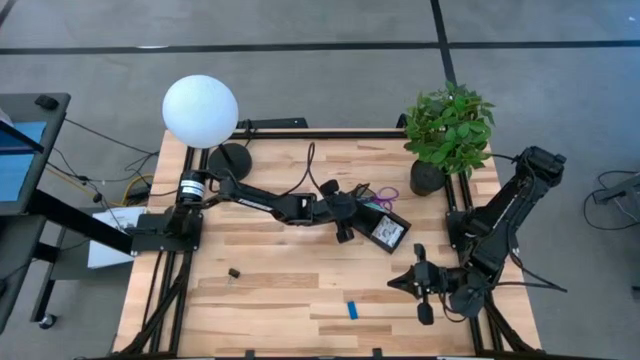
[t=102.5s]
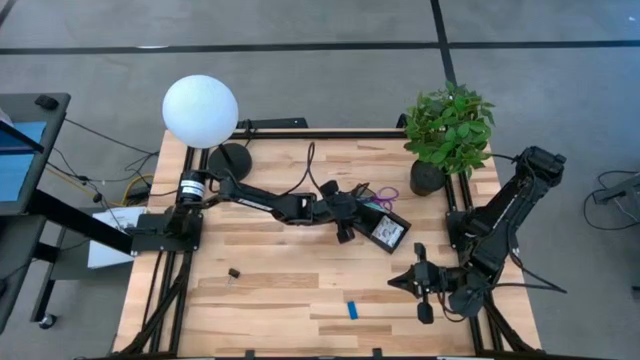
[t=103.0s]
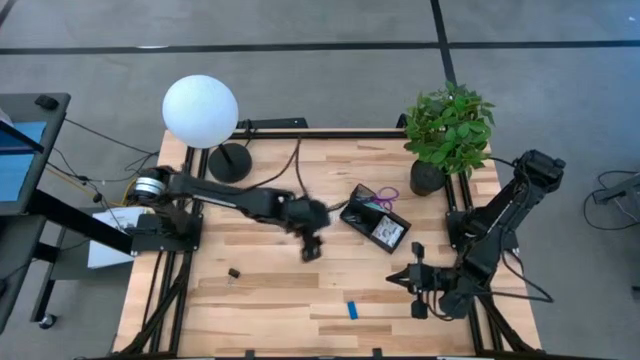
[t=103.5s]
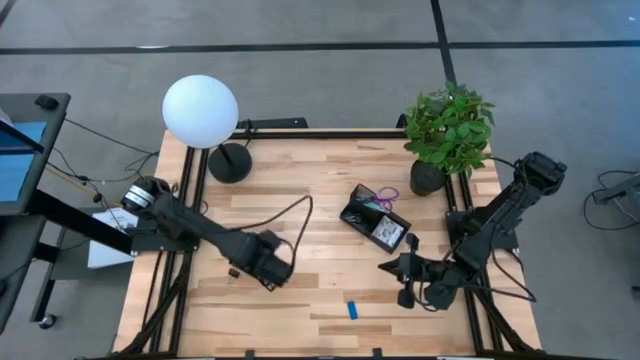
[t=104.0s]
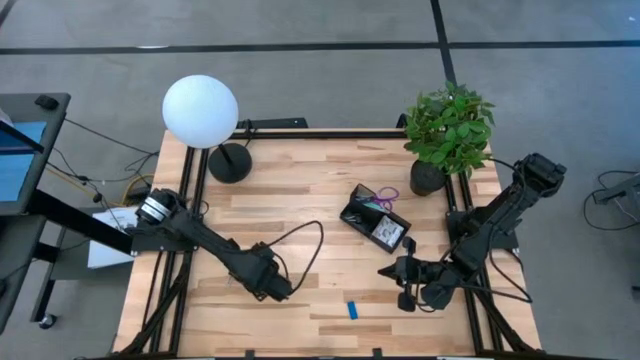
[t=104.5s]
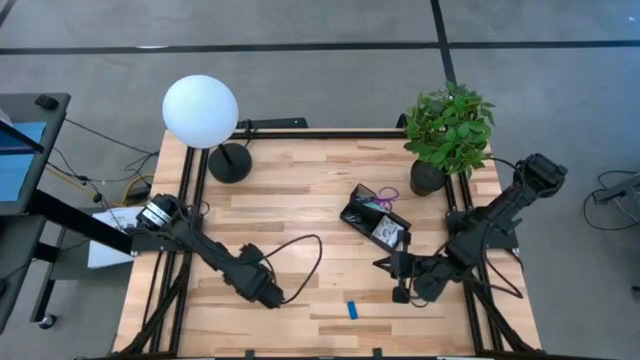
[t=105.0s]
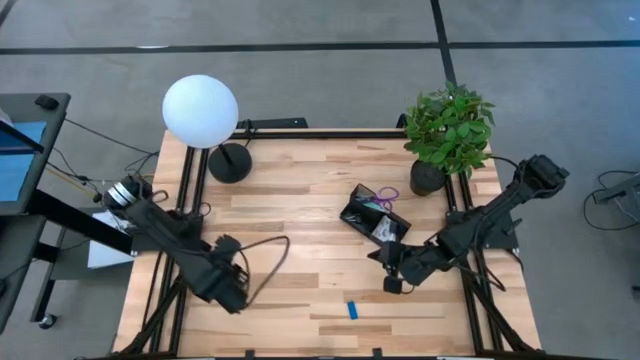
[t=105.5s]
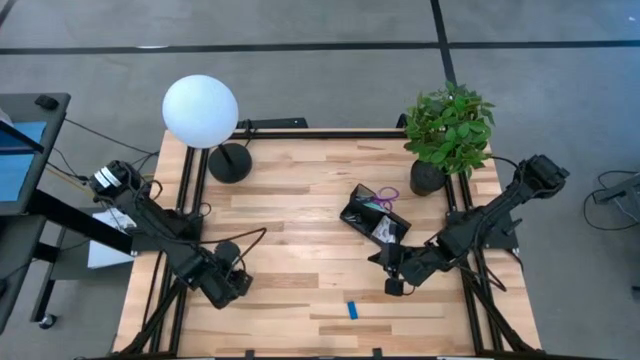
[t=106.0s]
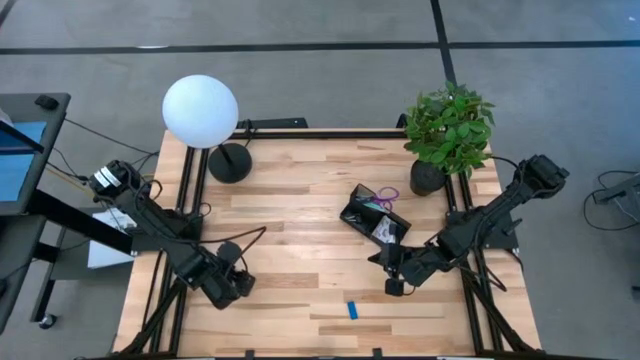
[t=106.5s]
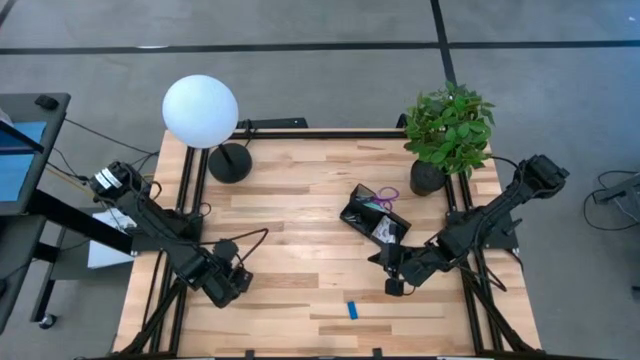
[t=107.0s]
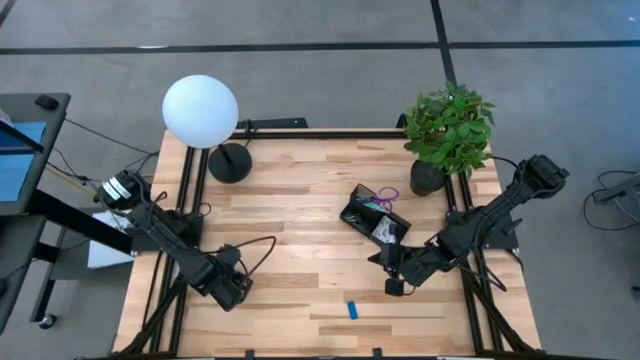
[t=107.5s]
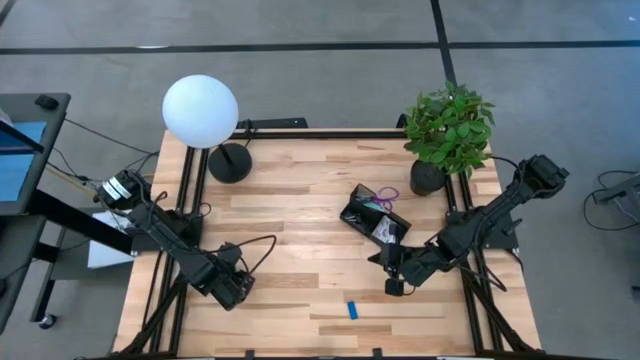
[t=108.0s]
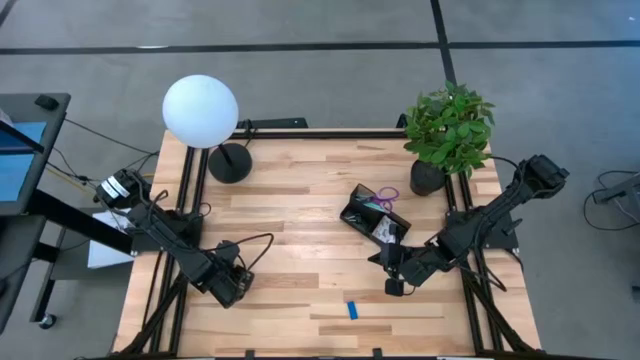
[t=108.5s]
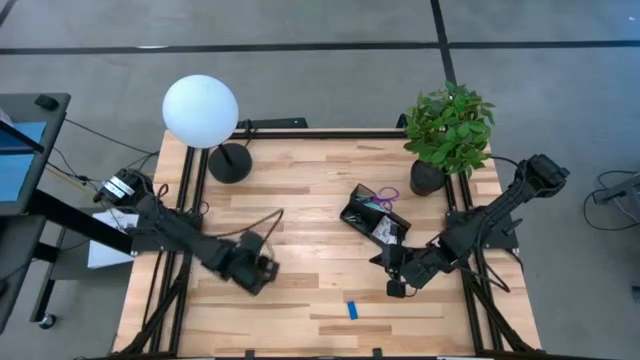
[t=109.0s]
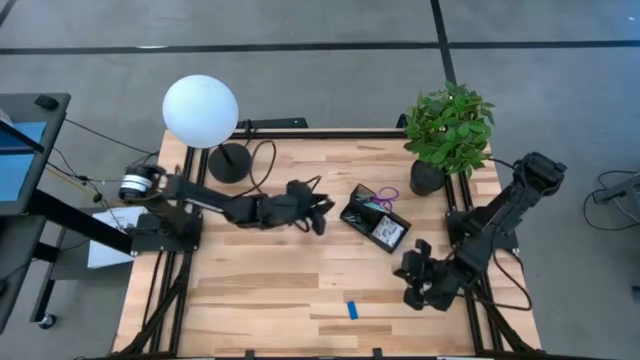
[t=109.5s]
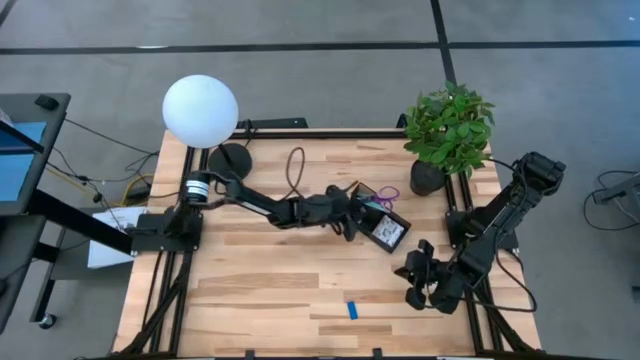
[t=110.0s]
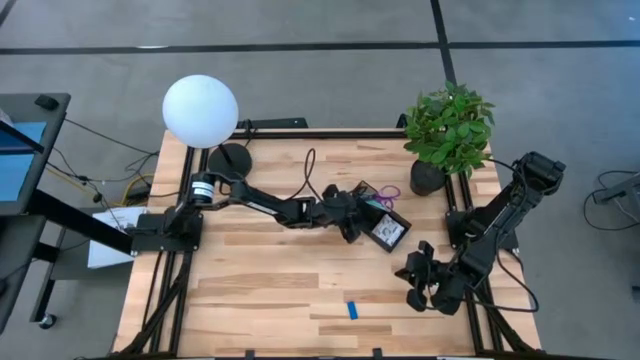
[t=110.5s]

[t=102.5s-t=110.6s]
Task: Pick and place office supplies into organizer
Put the black binder clip into the black desk organizer

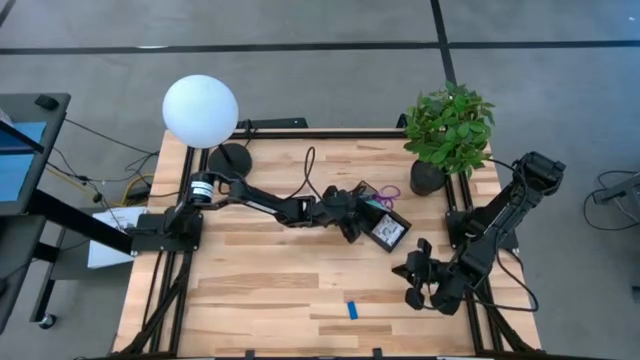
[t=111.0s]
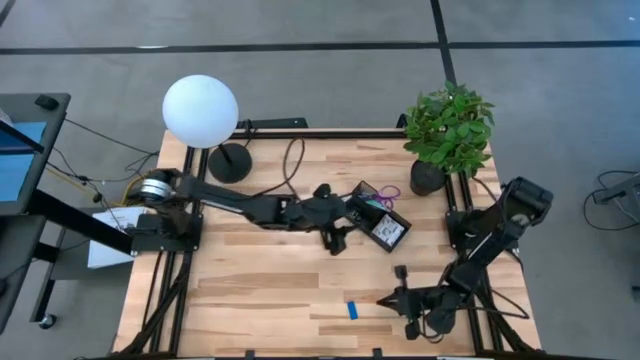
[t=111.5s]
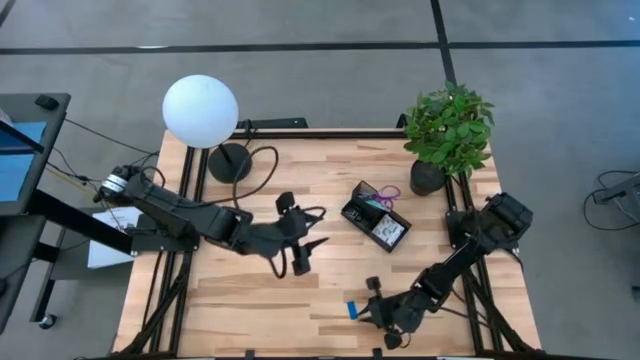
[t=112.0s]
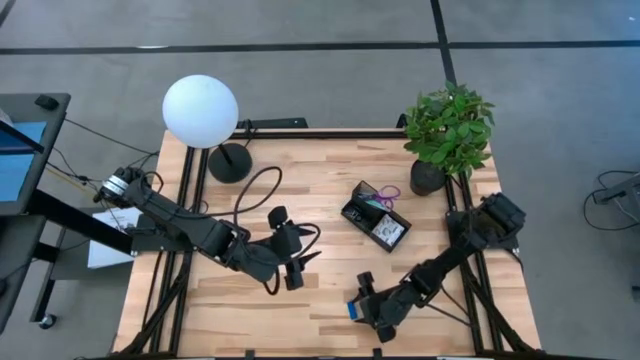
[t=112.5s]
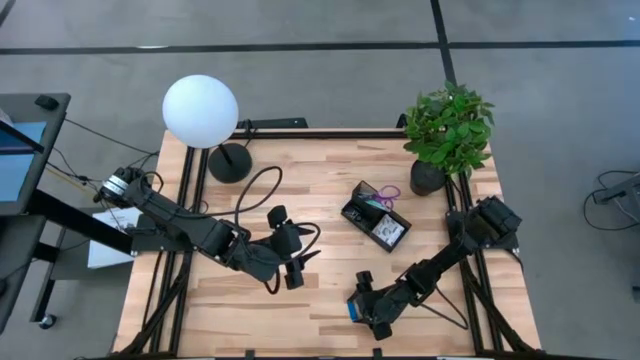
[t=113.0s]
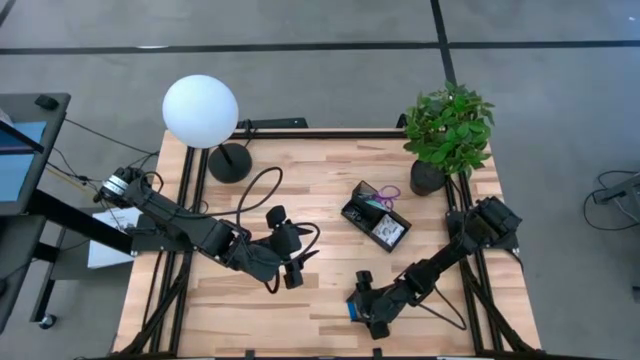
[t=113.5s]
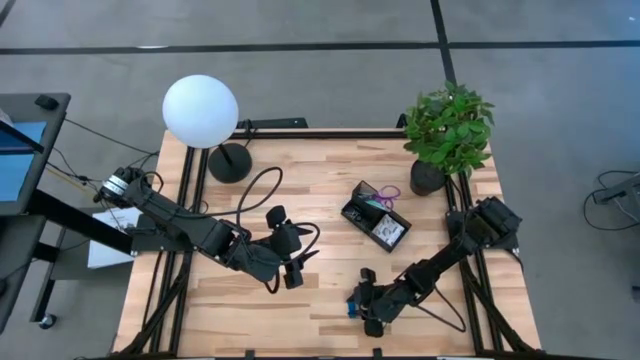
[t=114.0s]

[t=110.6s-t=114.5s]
Put the blue eraser into the black desk organizer

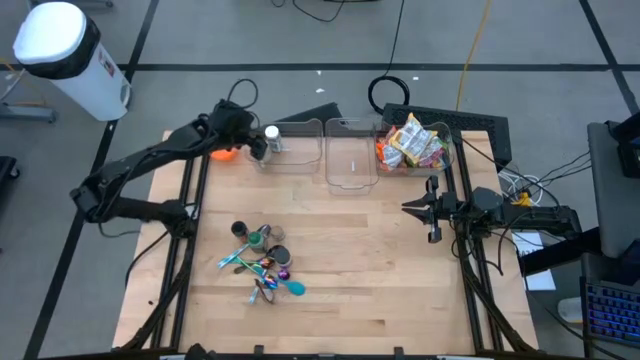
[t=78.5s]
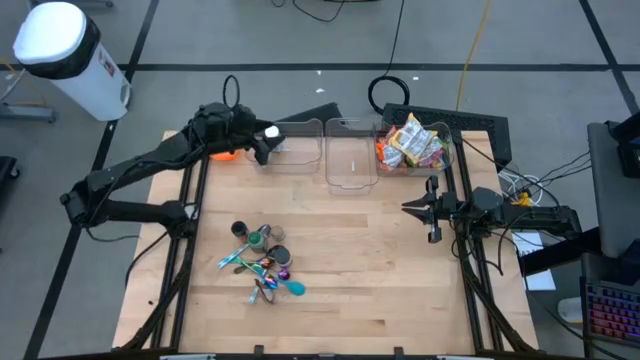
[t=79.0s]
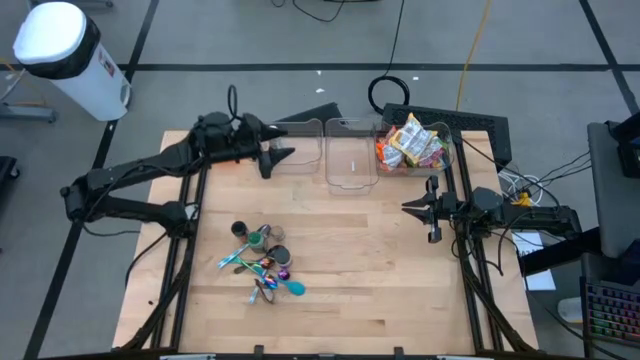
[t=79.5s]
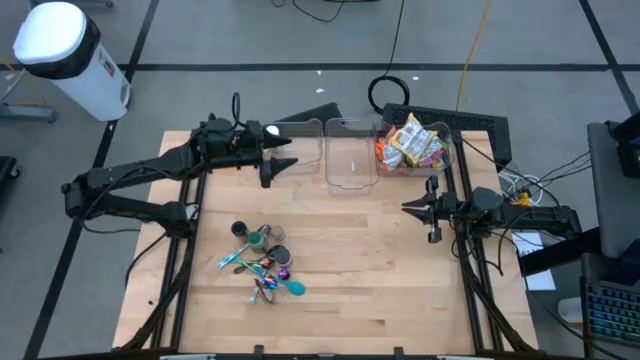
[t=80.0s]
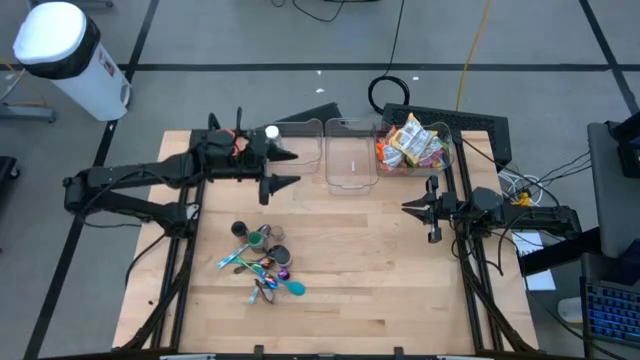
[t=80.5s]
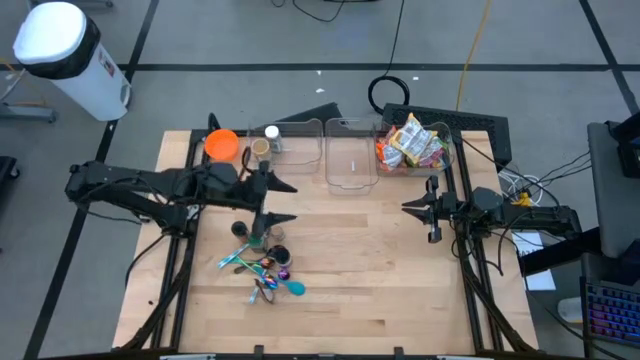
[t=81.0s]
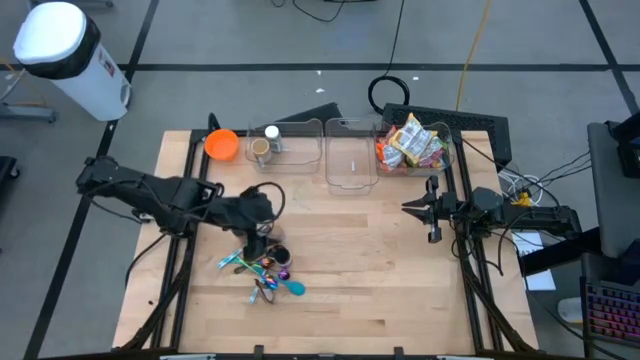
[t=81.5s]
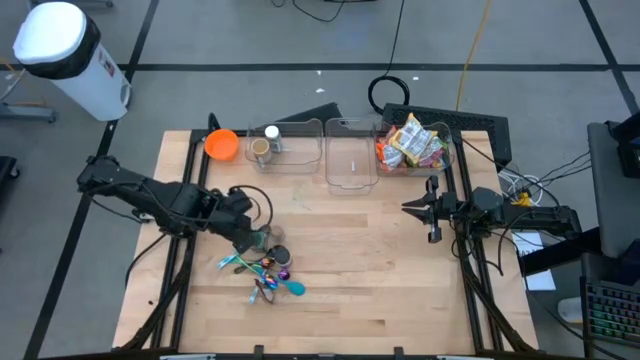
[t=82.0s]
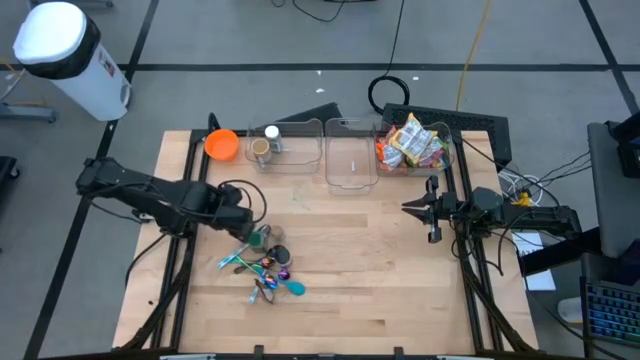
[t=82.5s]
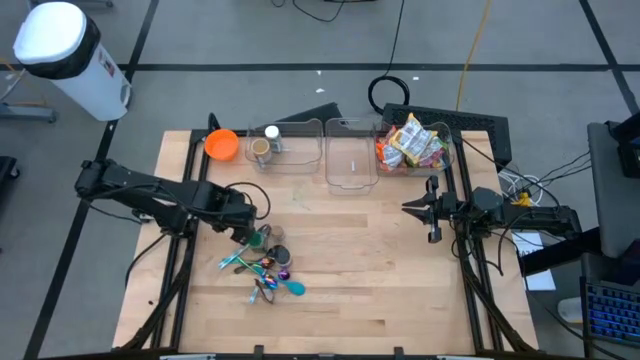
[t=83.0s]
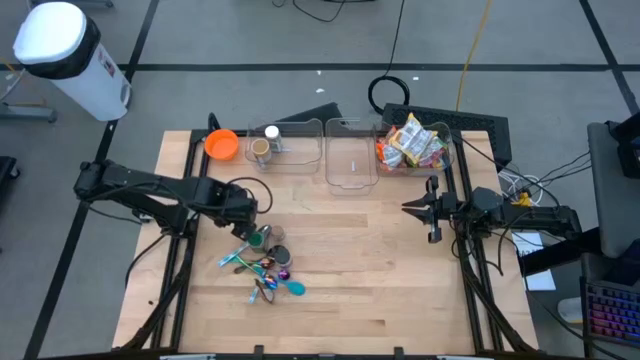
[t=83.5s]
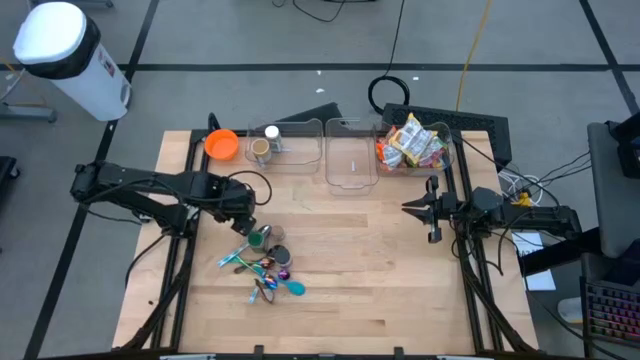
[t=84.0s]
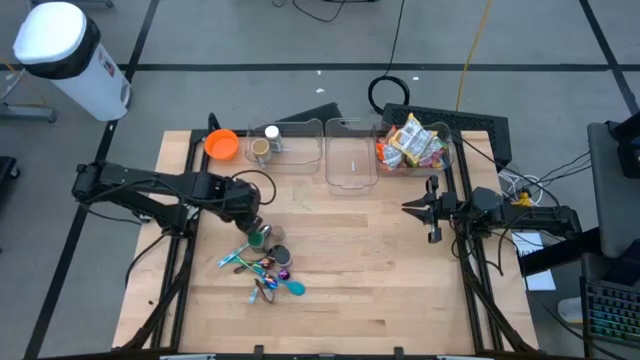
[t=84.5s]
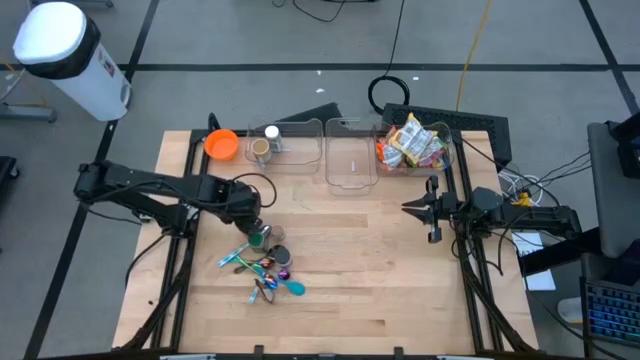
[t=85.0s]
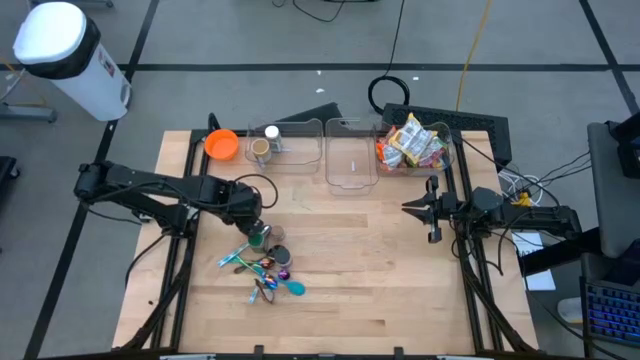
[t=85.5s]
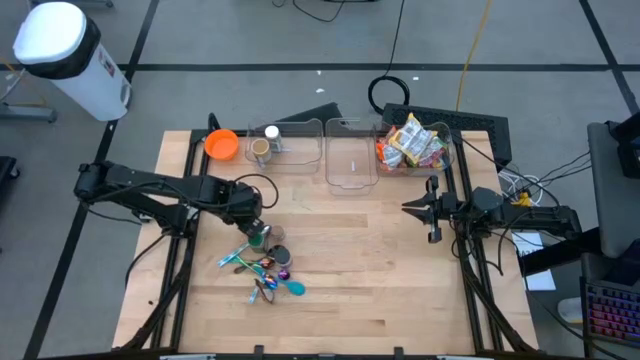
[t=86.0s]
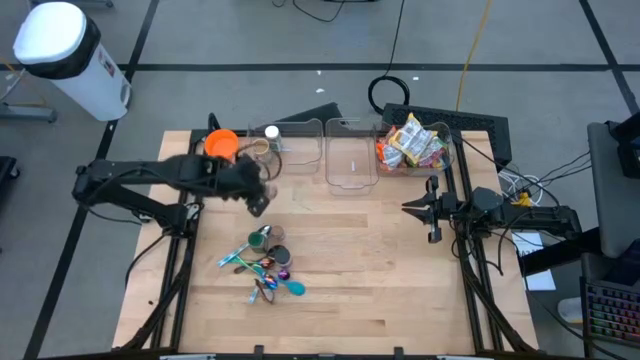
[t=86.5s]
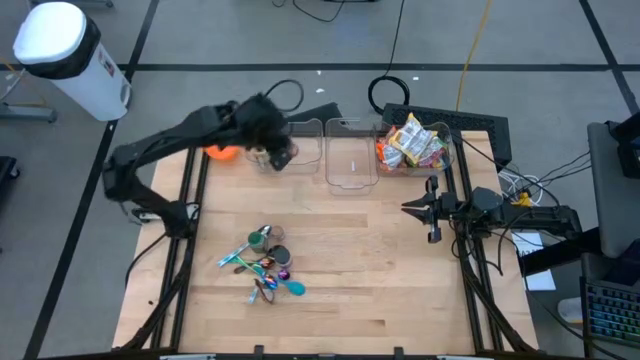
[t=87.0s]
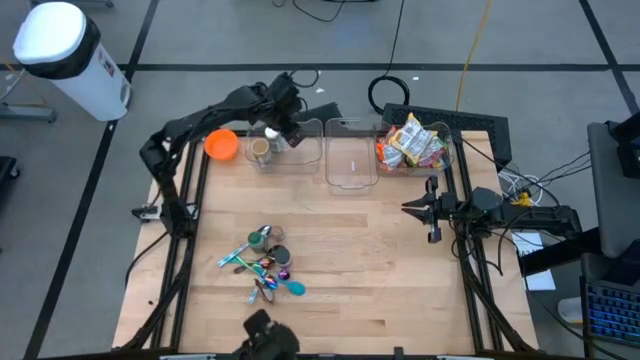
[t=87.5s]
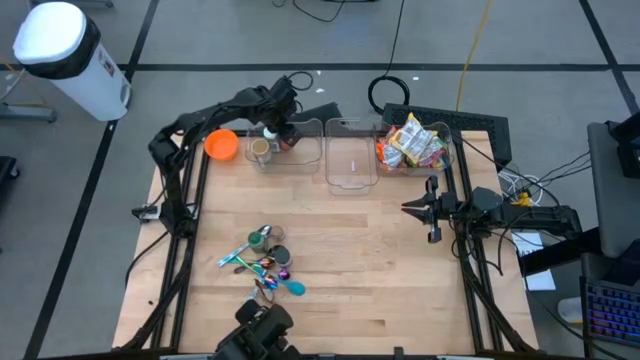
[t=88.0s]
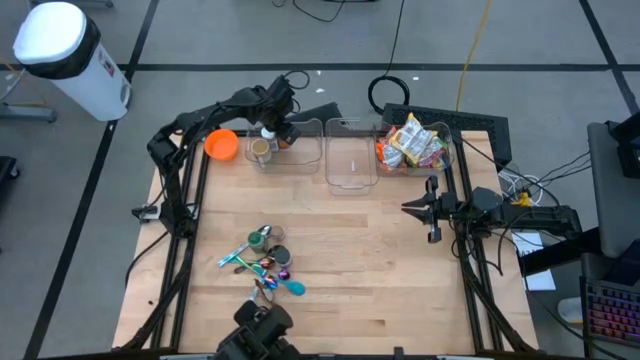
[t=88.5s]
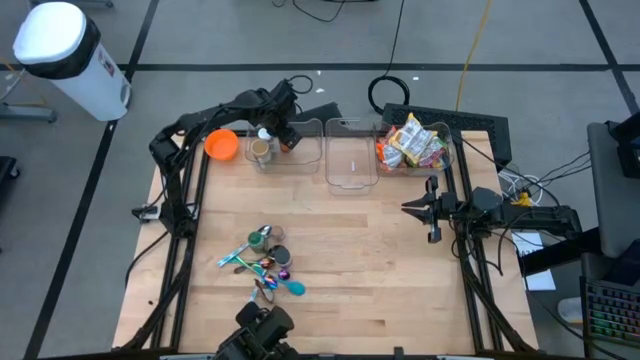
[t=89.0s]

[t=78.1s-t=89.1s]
Task: Pick & Place Food Item
Put the left black seasoning bottle into the left transparent bin
